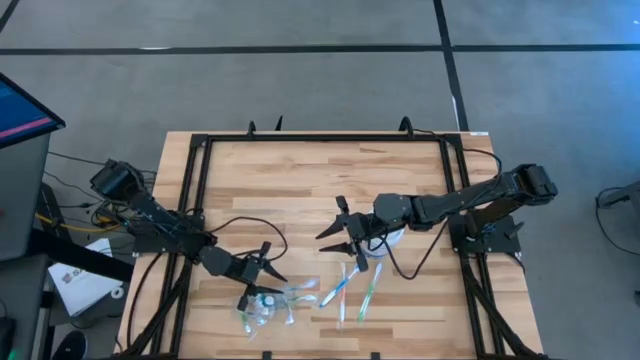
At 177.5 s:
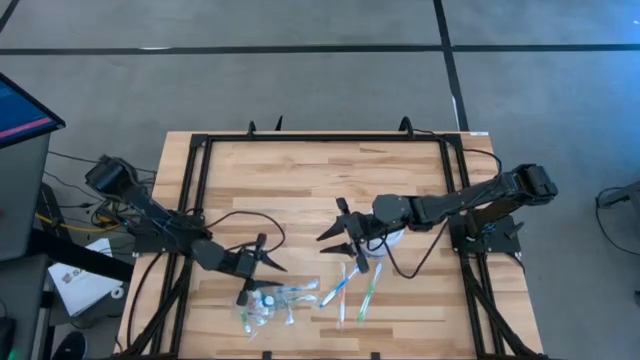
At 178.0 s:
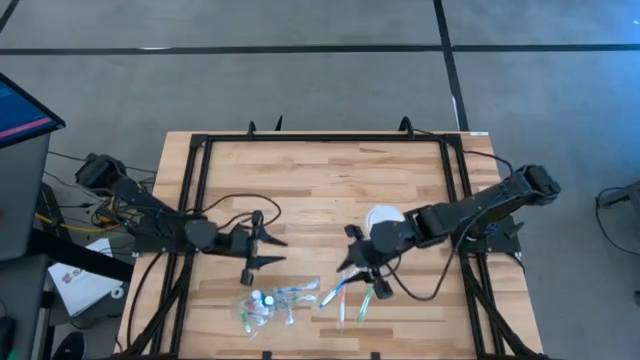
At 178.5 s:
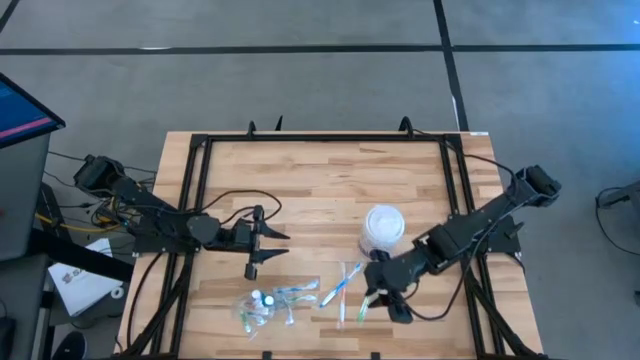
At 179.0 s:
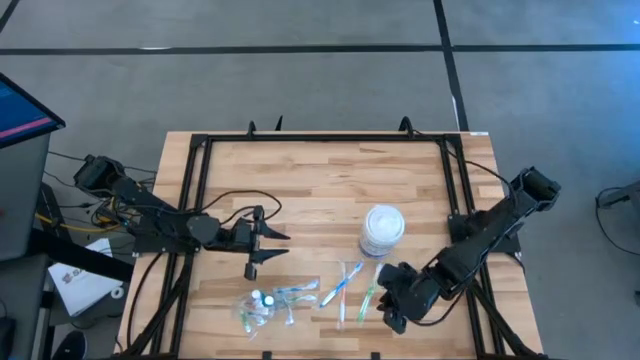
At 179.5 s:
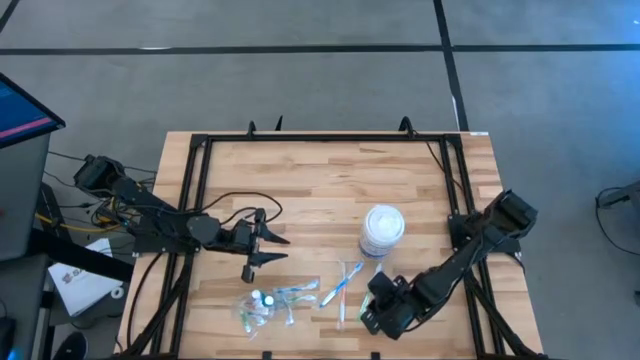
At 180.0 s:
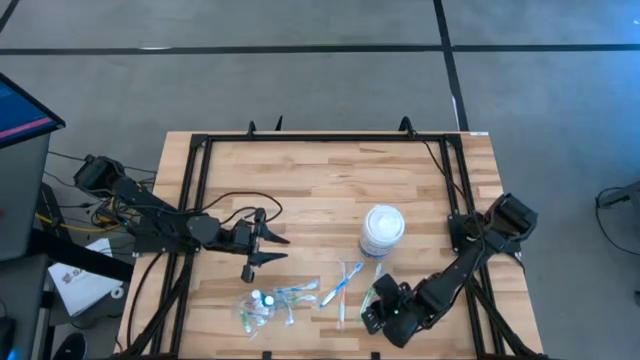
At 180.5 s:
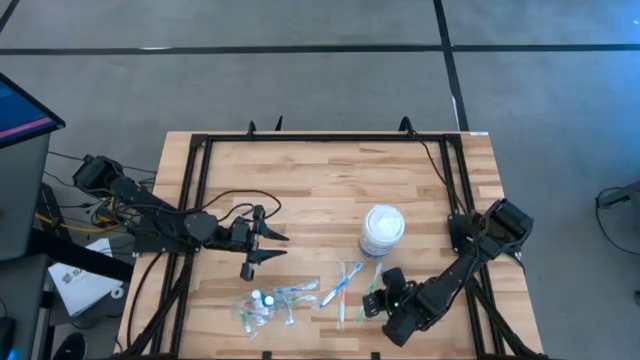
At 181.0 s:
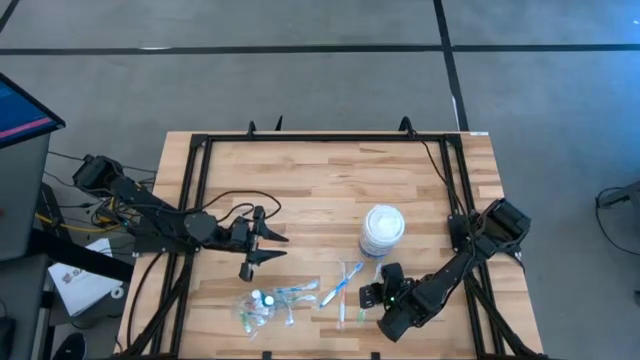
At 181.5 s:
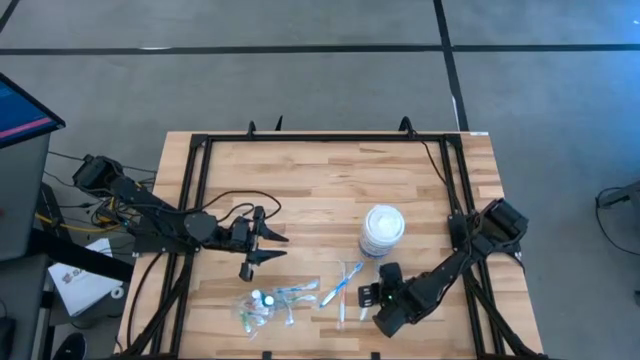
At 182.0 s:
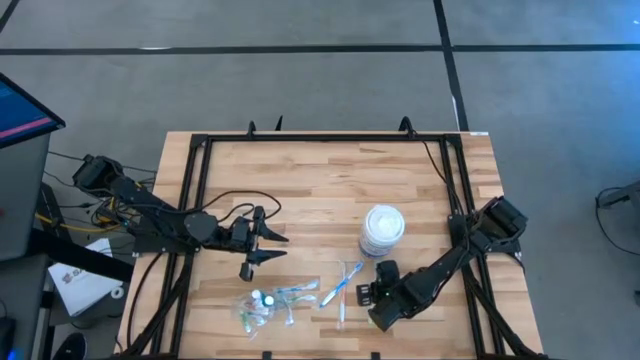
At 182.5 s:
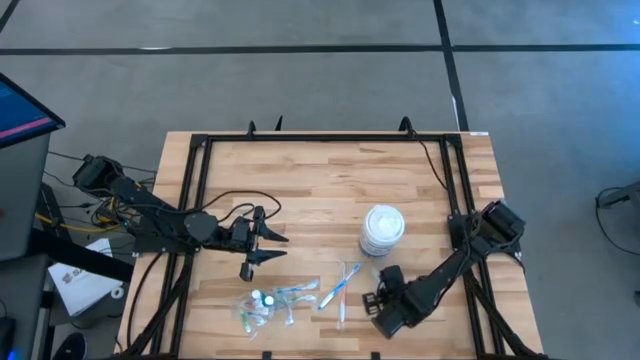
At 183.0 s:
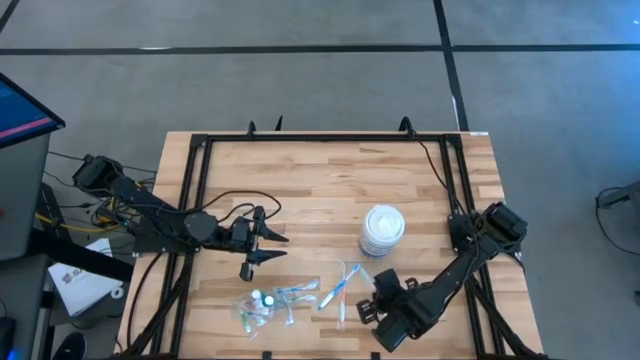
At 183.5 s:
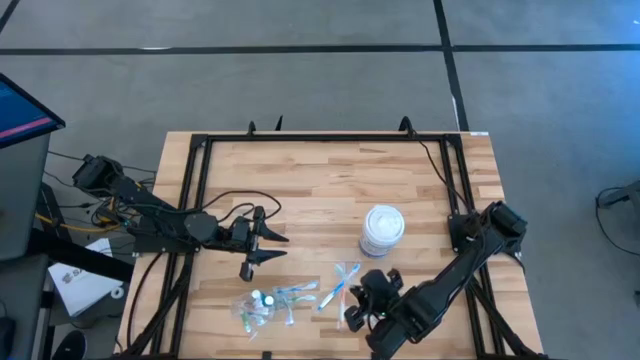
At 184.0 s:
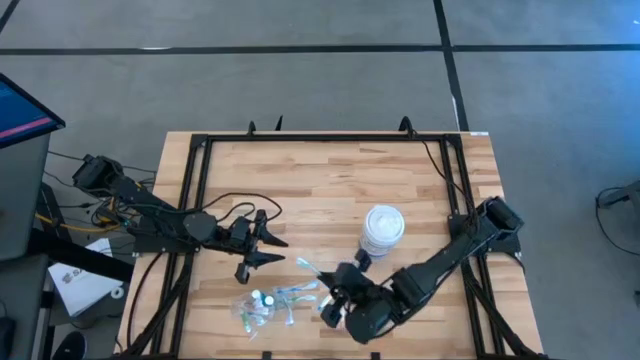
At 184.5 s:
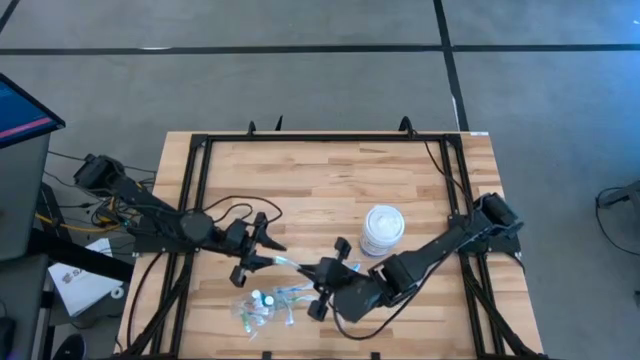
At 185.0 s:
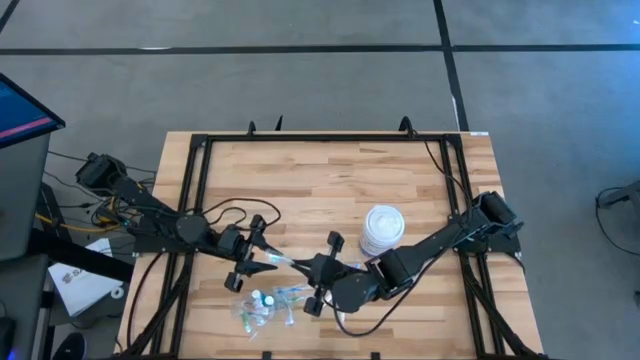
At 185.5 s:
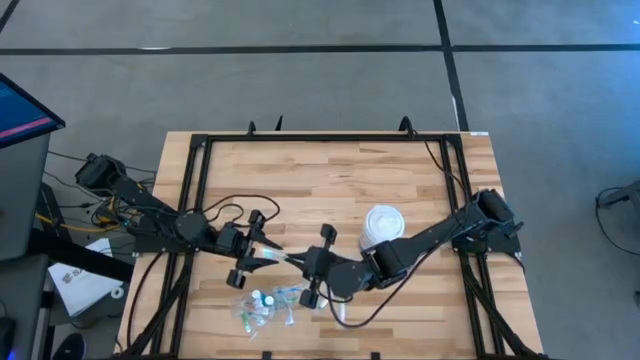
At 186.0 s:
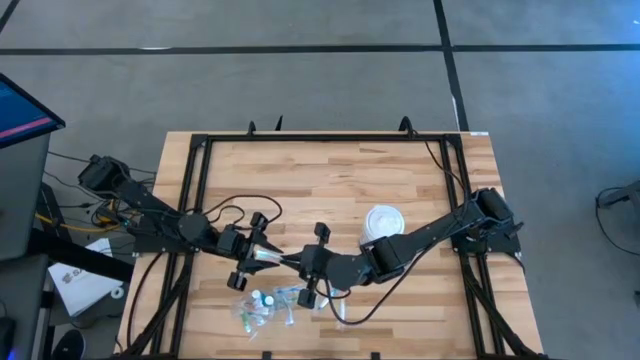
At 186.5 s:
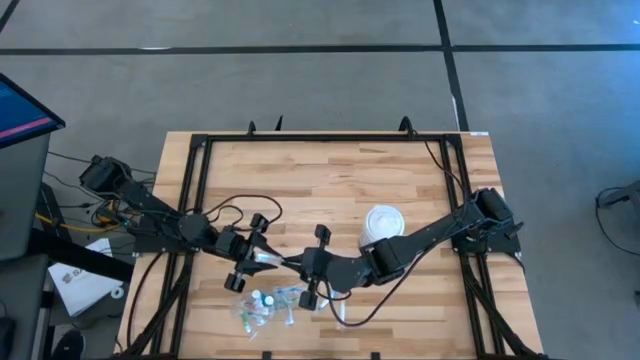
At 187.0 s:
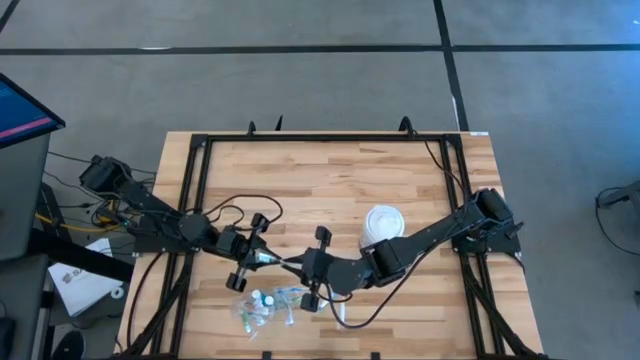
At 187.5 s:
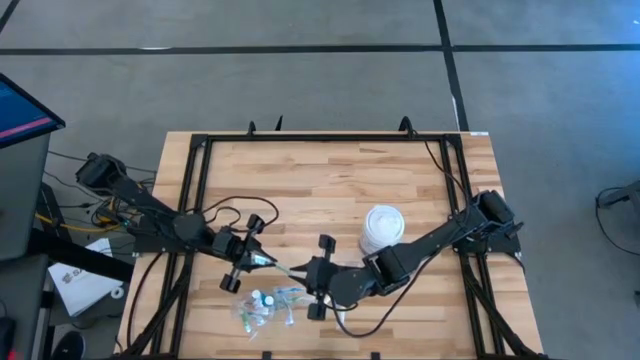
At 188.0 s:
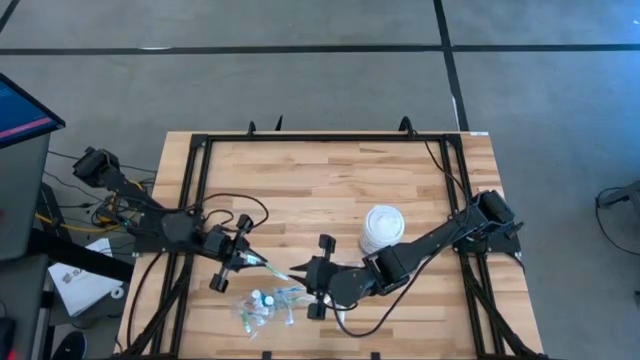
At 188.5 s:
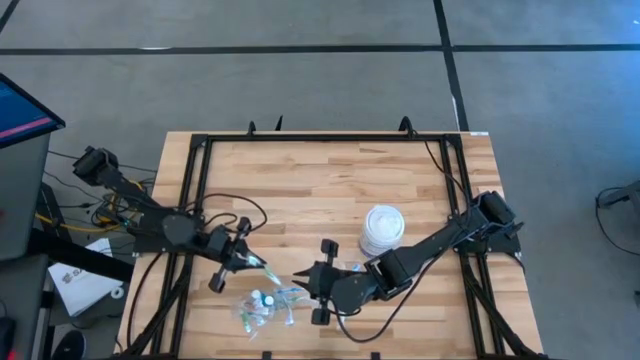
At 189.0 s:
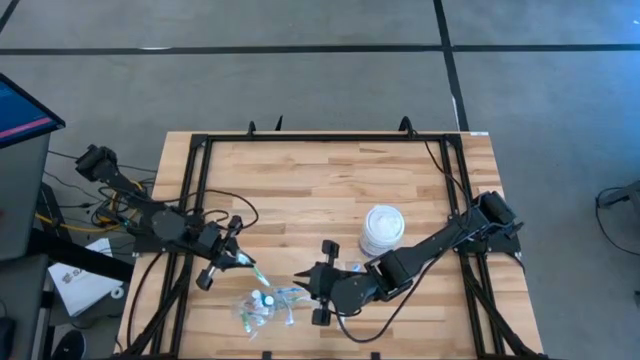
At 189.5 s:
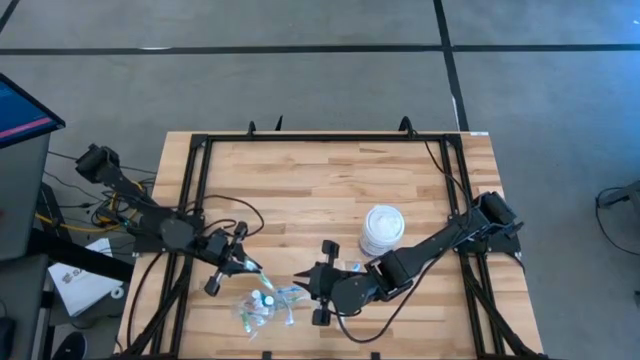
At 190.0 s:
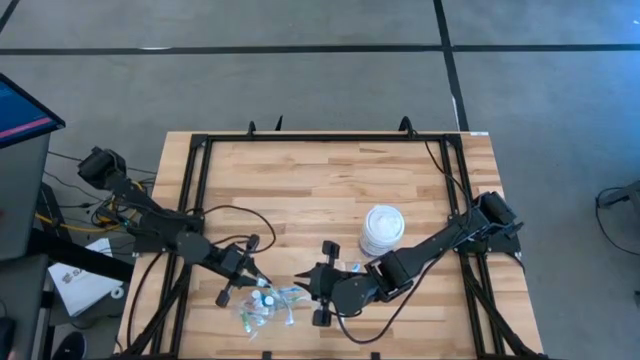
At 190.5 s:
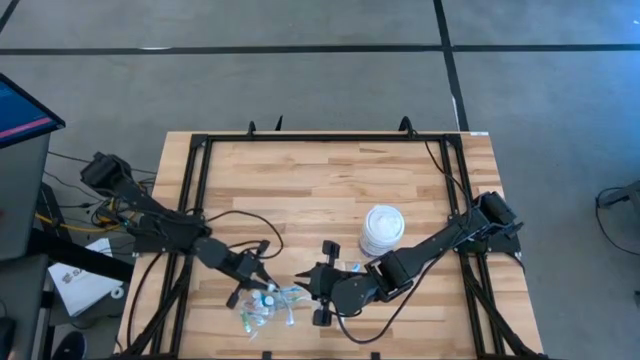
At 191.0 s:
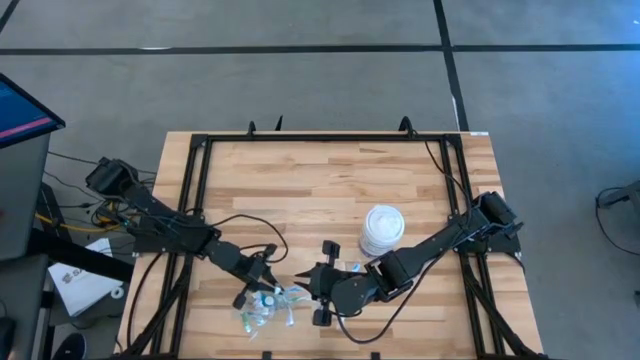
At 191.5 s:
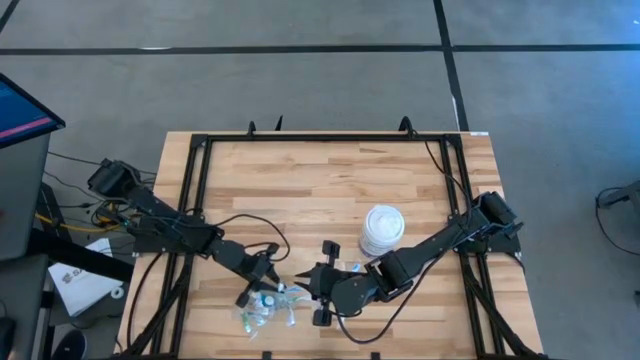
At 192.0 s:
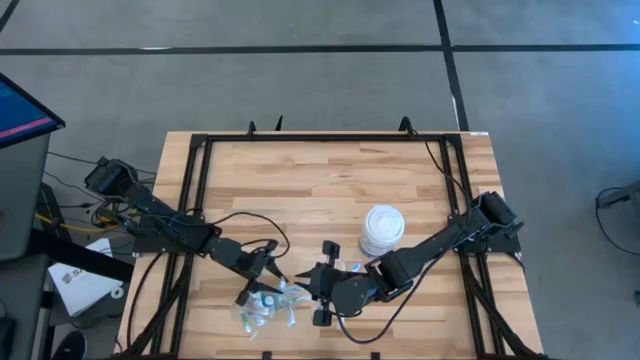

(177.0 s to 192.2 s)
Task: Pick & Place toothbrushing station
Put the green toothbrush into the transparent organizer

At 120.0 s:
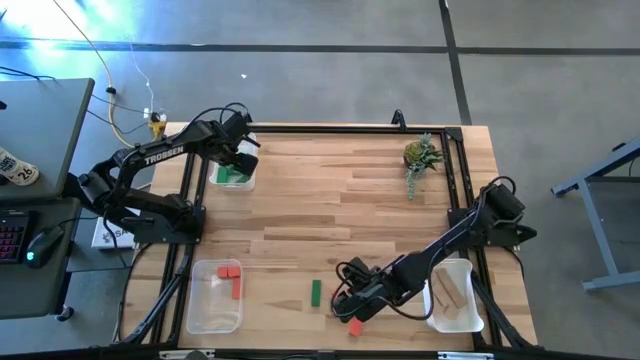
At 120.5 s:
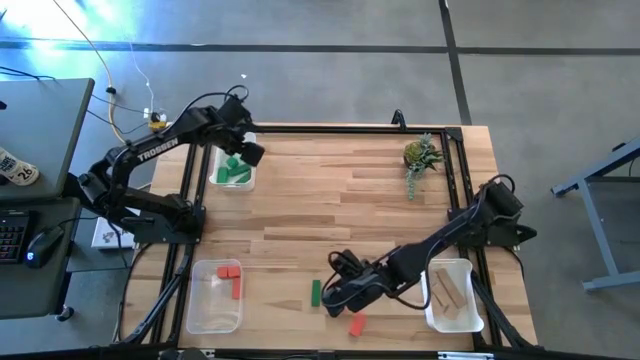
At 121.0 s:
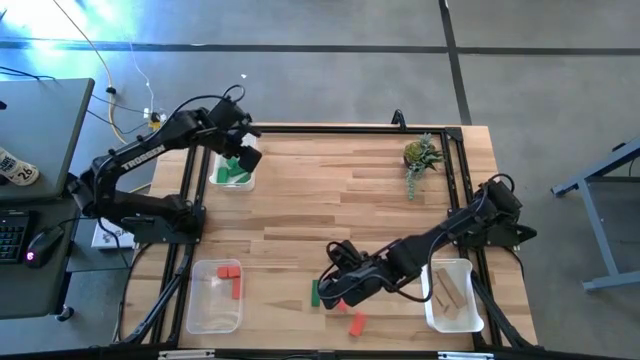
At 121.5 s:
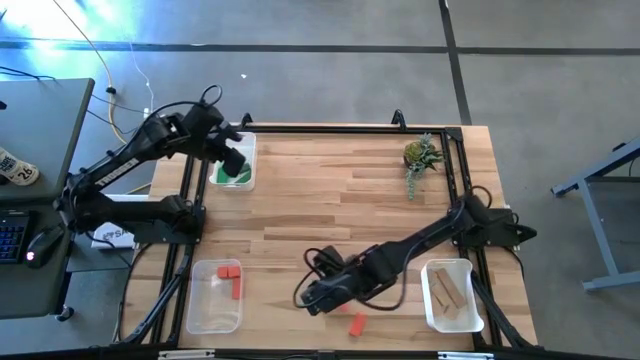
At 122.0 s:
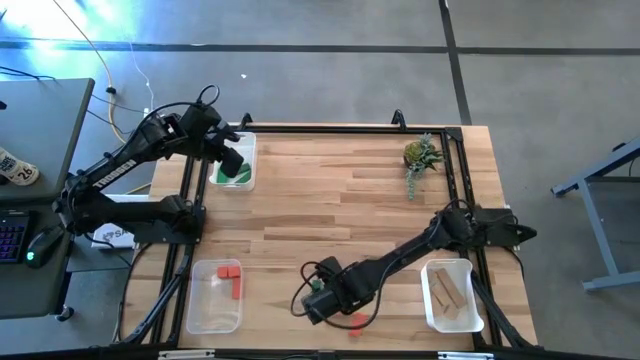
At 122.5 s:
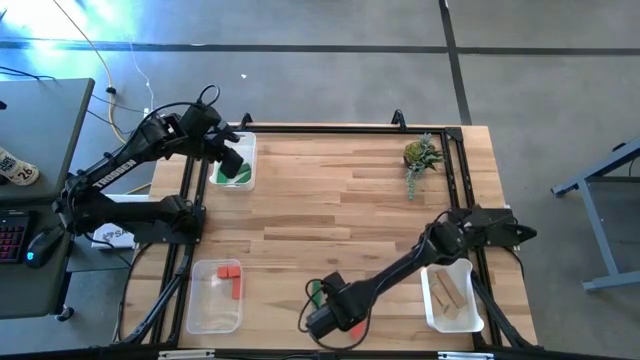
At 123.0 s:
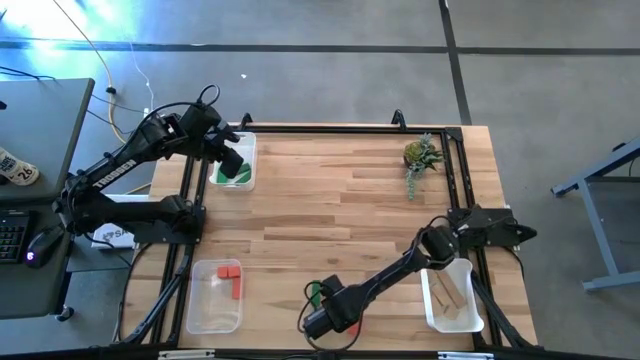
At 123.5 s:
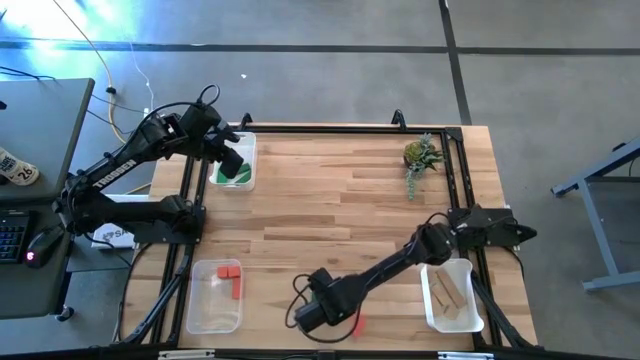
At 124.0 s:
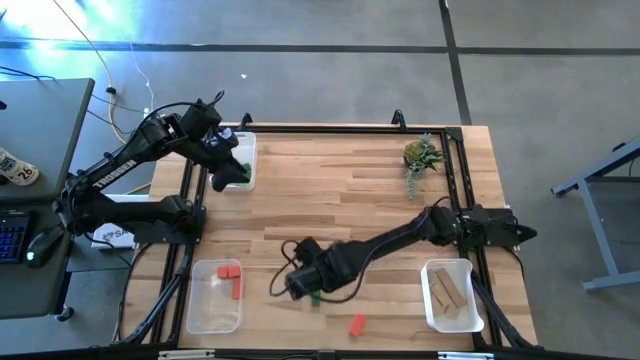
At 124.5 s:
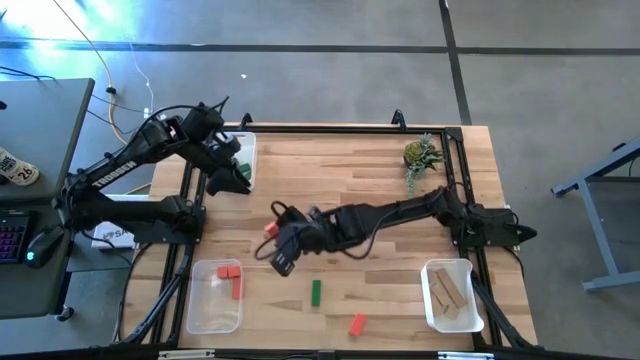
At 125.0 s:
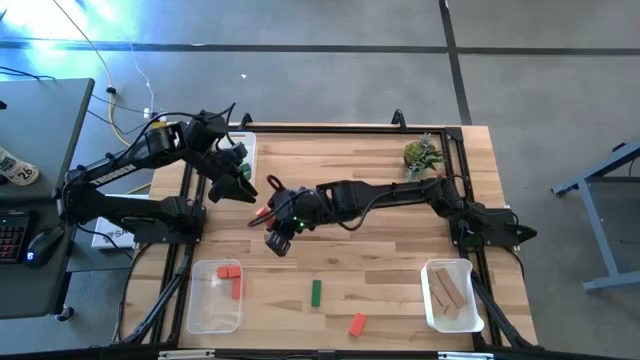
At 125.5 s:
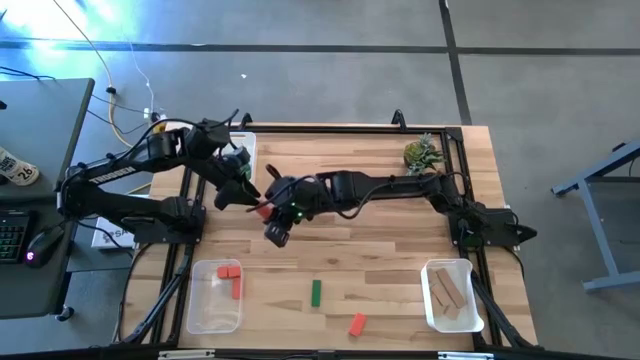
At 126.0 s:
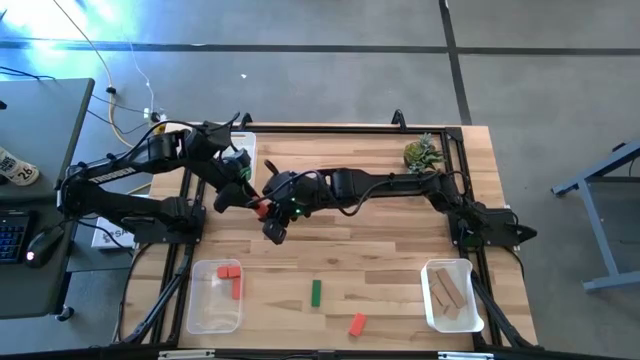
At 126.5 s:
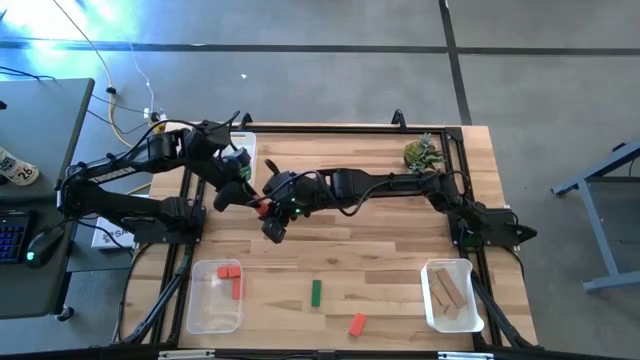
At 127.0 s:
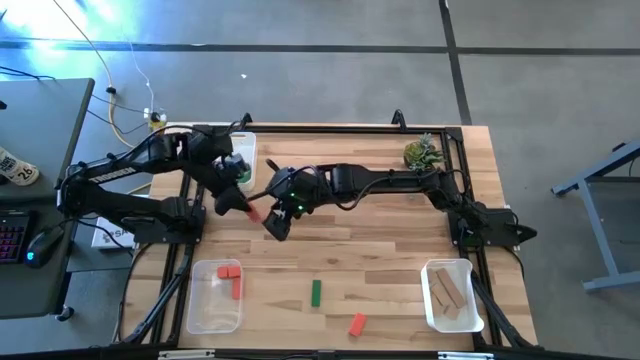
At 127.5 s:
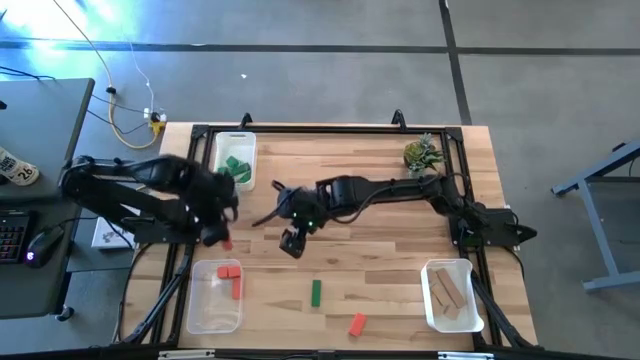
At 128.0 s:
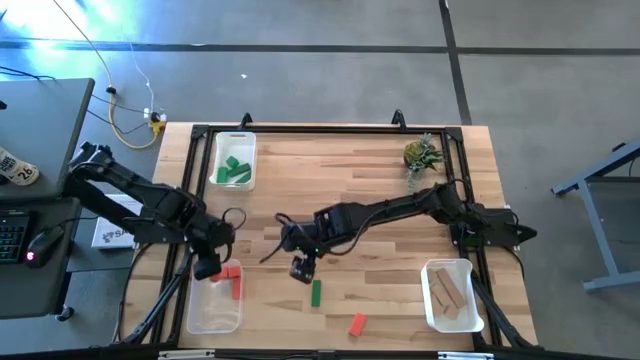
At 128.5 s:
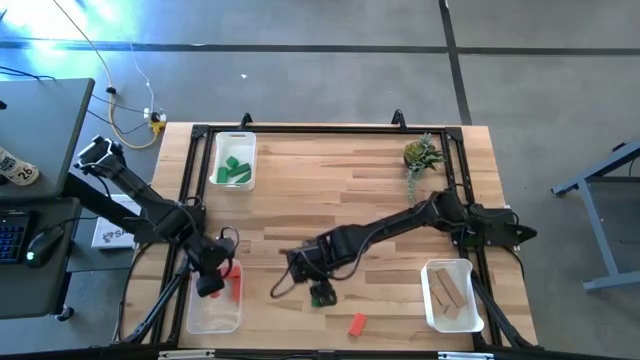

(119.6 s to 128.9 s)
Task: Sort & place blocks by color
Put the orange block into the transparent bin
